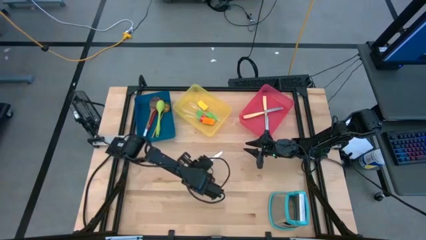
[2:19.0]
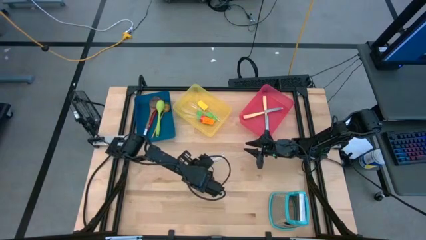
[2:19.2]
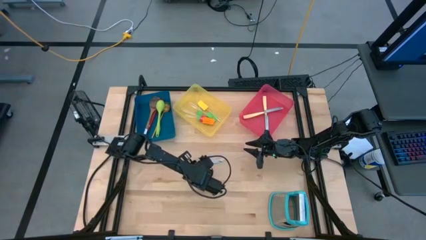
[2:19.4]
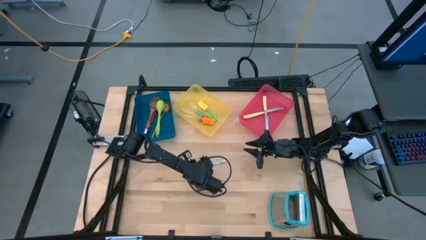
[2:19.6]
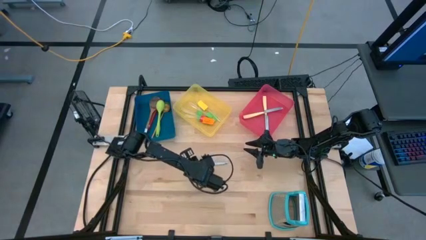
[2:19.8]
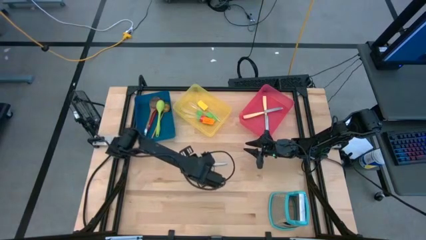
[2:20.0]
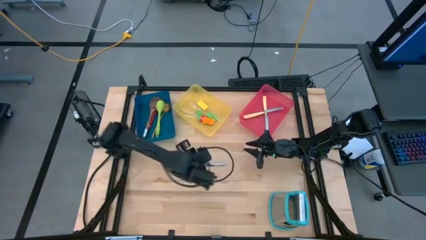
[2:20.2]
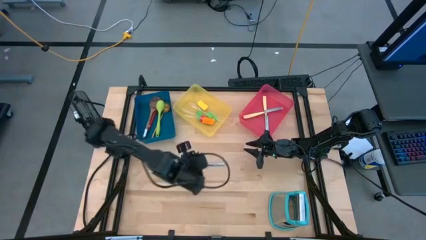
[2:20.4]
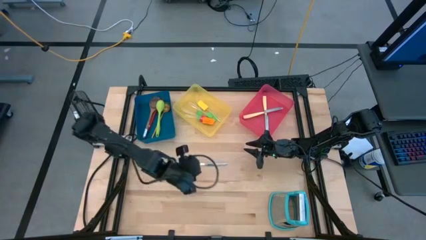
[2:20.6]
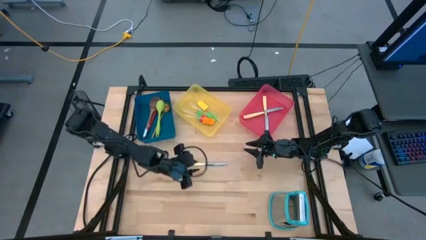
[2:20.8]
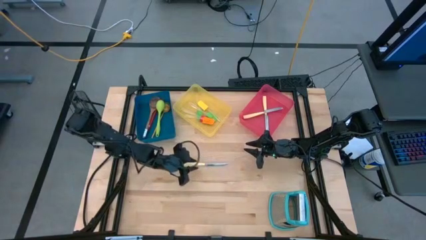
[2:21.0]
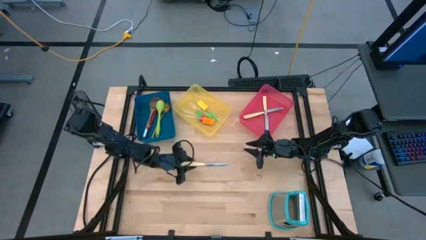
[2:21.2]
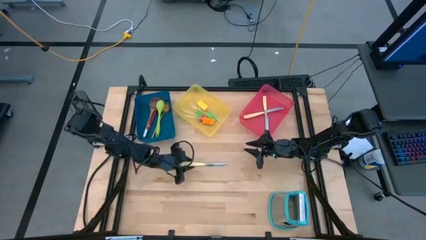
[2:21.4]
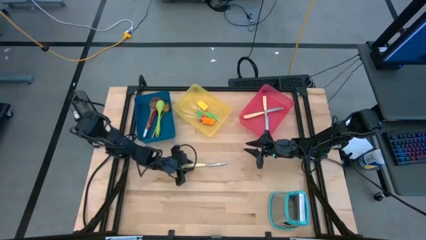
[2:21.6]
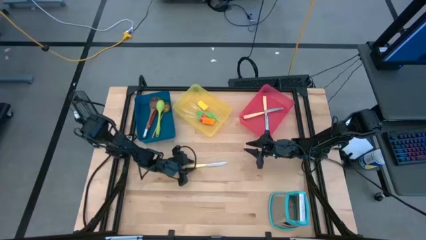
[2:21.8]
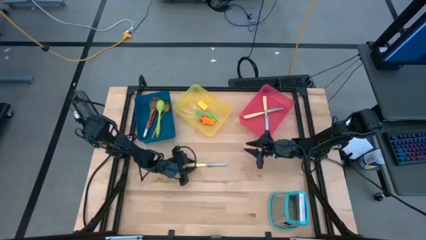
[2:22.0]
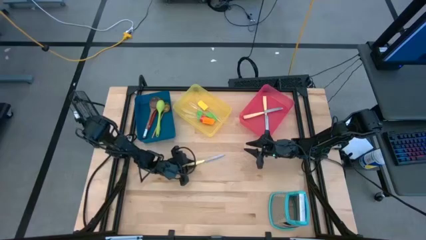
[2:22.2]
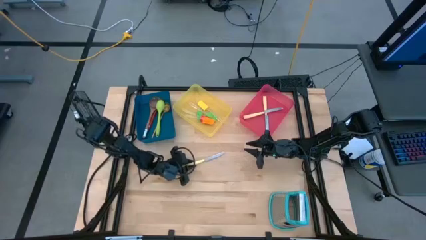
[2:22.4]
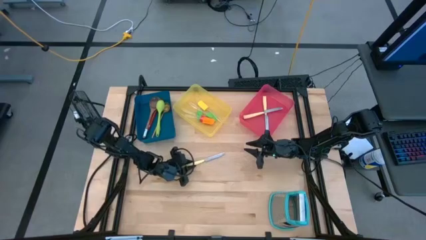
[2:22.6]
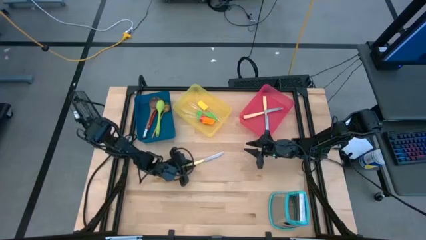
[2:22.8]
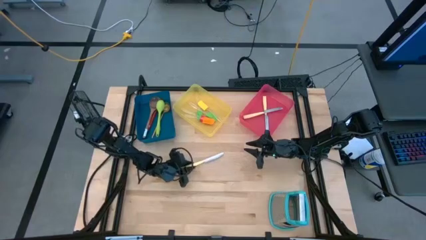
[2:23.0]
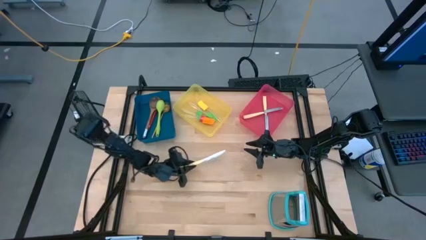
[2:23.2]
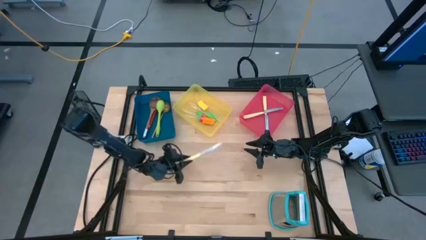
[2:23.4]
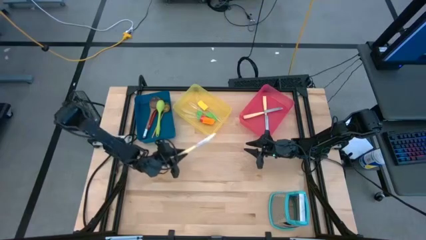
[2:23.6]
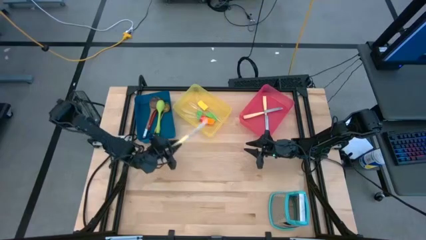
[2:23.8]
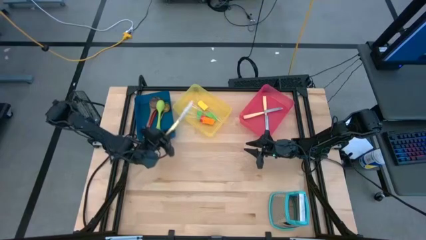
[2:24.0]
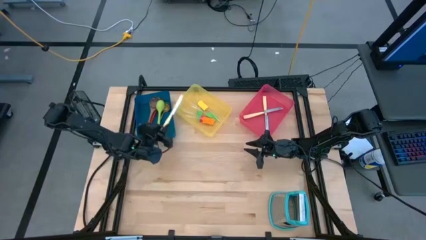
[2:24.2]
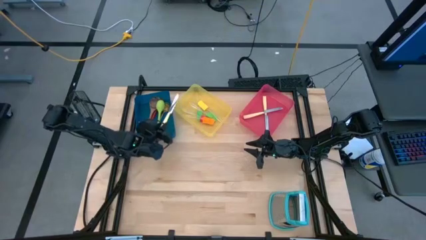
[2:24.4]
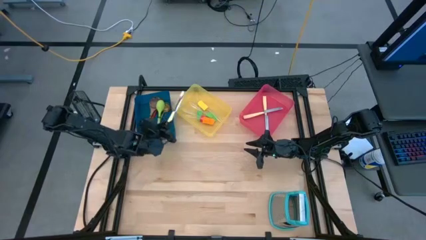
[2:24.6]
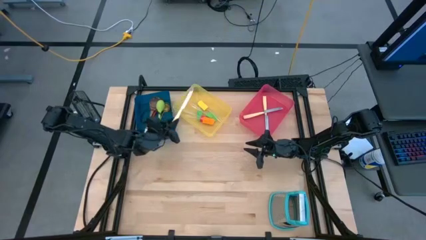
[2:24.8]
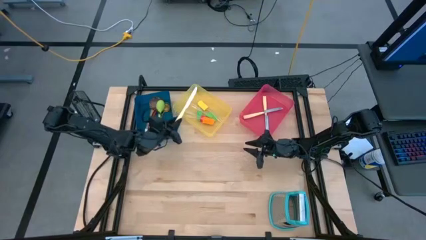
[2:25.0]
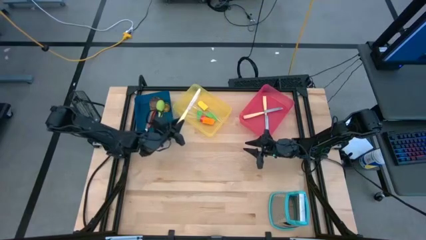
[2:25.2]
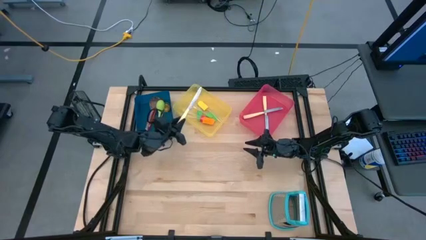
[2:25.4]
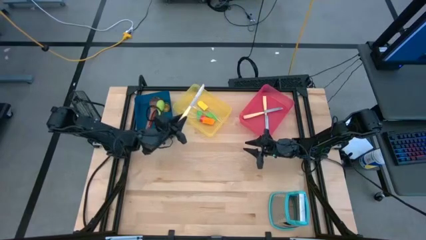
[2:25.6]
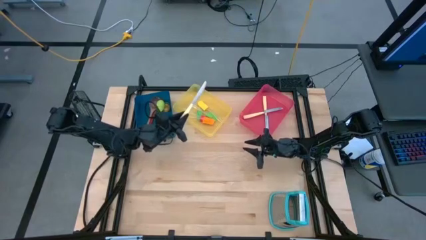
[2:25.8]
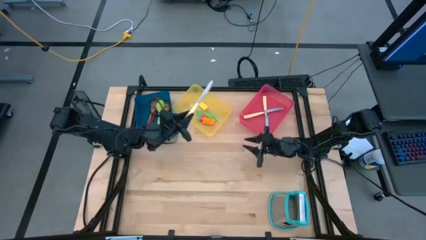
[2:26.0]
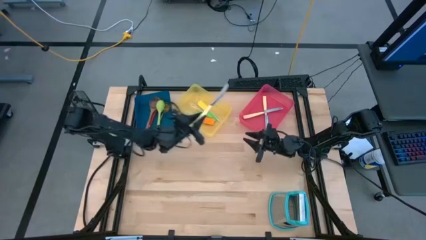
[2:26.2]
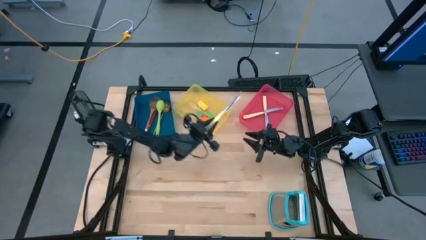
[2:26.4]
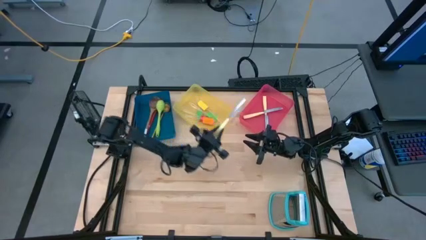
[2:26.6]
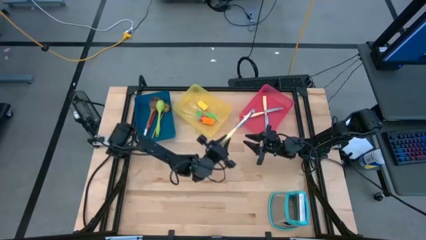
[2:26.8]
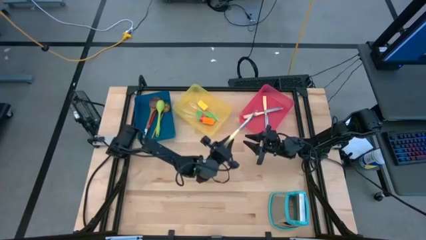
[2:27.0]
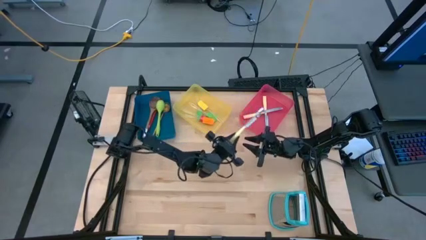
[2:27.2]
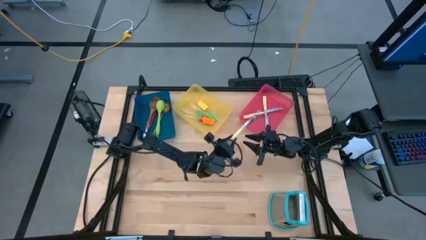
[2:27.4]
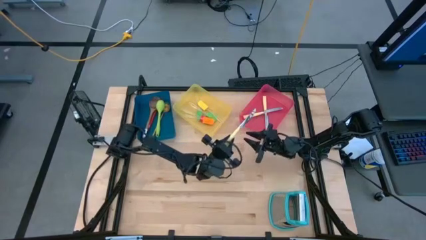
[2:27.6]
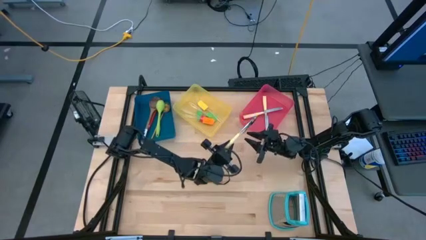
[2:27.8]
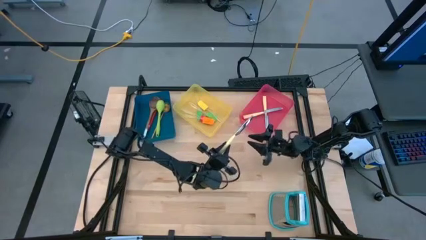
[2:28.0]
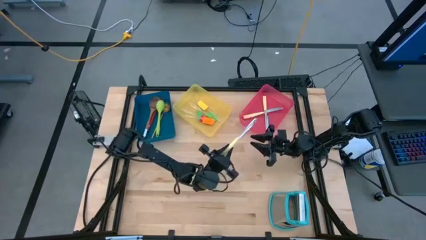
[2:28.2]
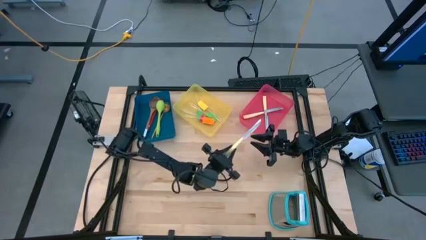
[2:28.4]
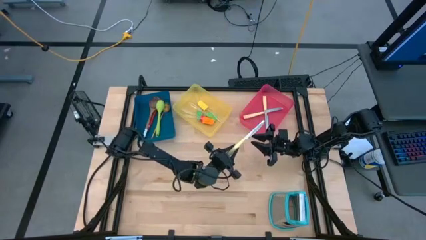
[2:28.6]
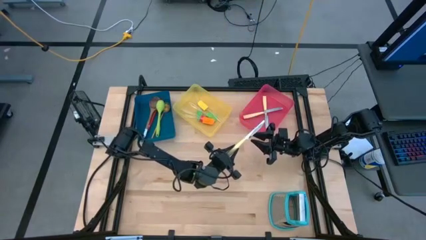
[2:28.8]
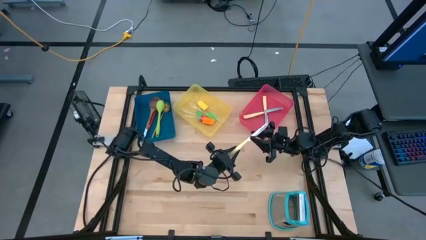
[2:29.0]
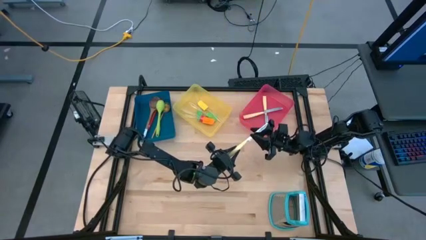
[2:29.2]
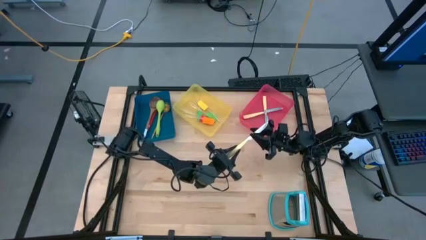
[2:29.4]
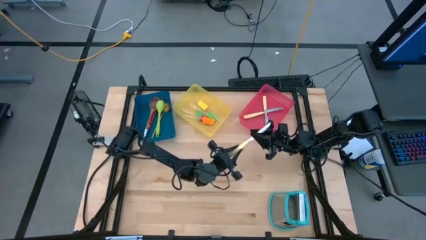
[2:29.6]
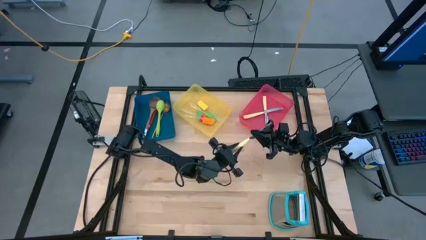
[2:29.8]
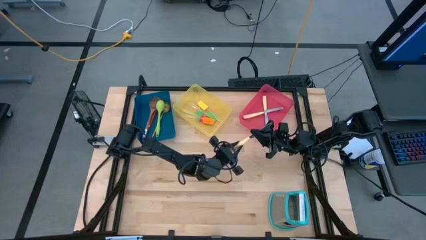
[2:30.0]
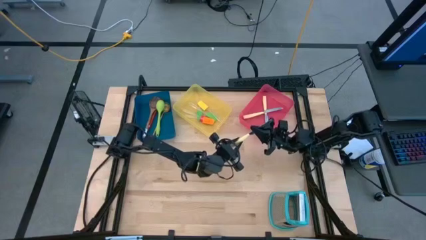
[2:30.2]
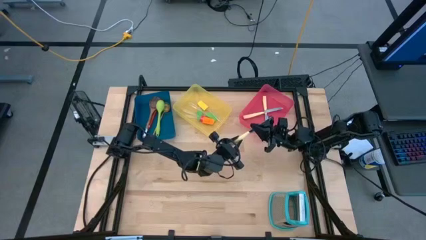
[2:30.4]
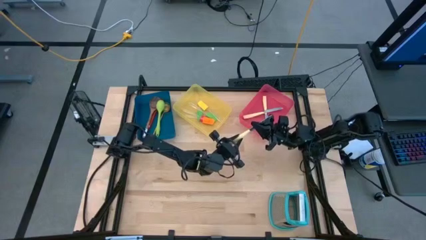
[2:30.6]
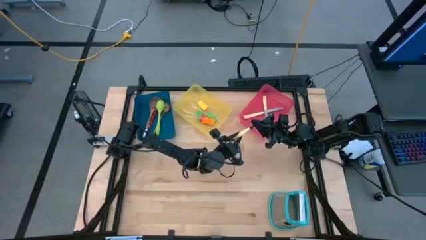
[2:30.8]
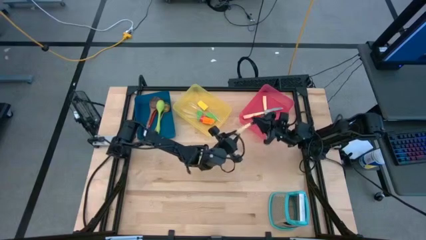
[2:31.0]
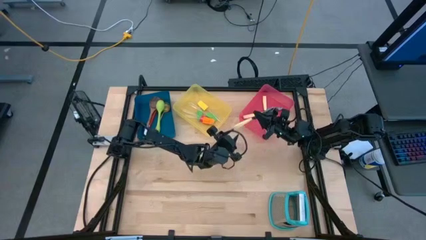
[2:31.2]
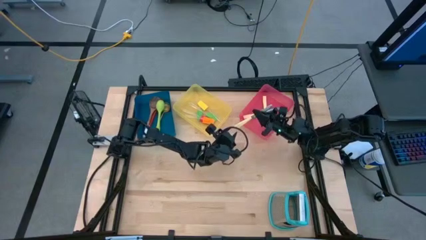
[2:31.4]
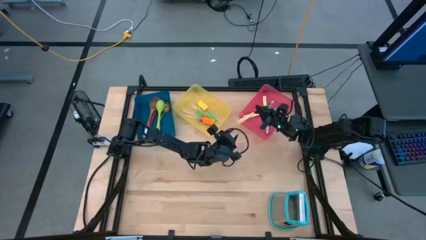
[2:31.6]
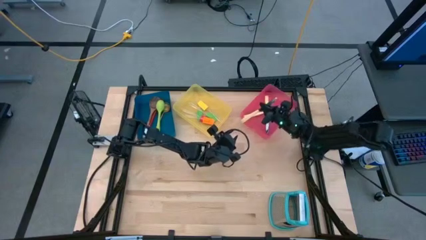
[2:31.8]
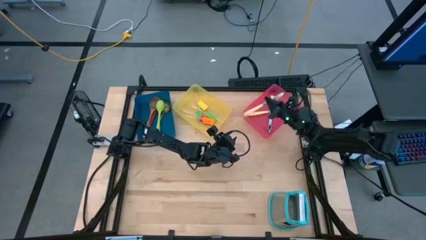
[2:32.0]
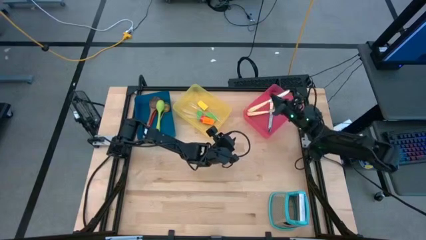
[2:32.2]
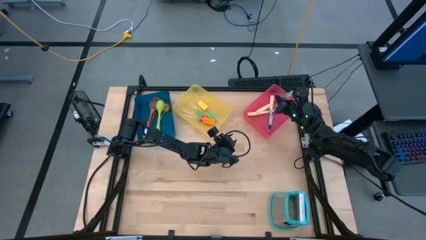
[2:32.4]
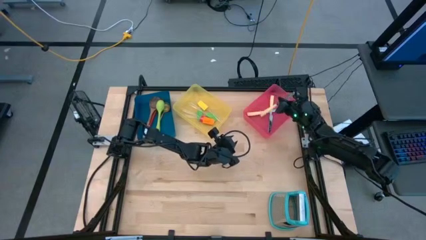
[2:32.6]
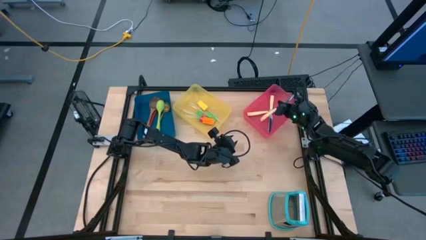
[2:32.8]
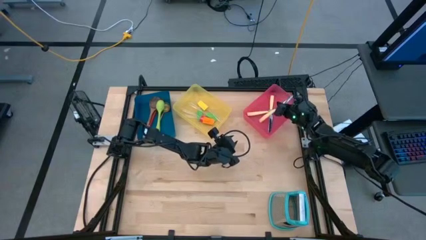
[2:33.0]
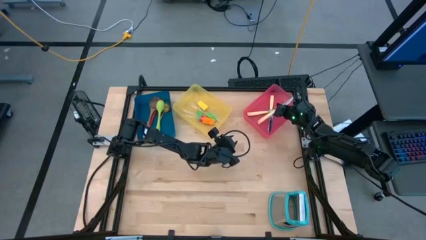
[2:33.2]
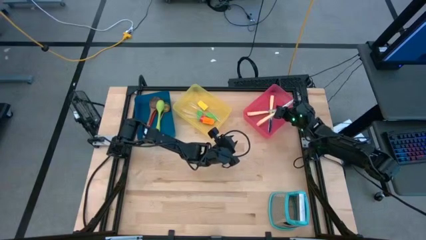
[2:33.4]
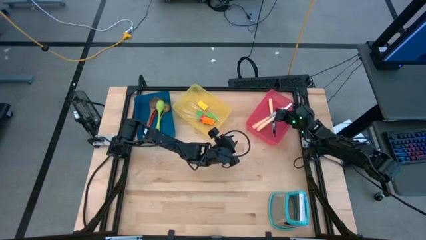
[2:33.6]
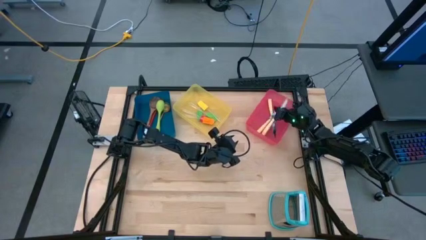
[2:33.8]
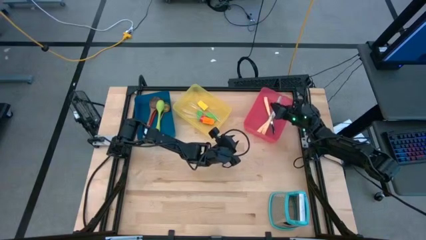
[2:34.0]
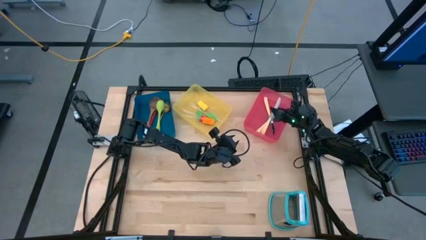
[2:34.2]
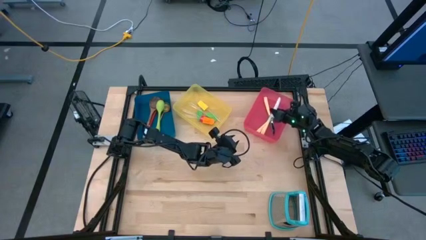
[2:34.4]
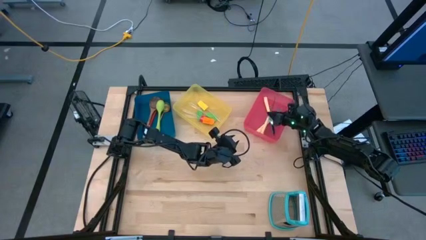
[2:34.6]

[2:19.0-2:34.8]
Task: Pick & Place Kitchen Items
Put the yellow table knife into the red bin
